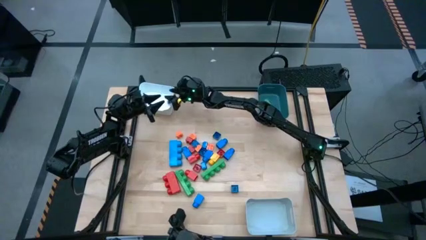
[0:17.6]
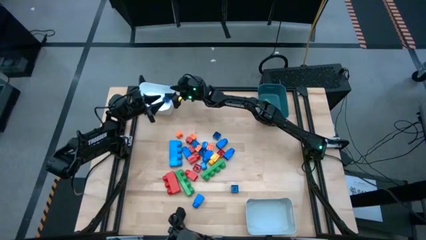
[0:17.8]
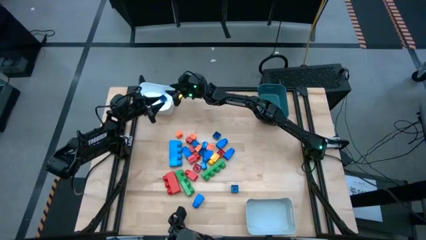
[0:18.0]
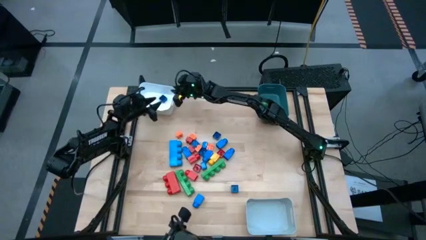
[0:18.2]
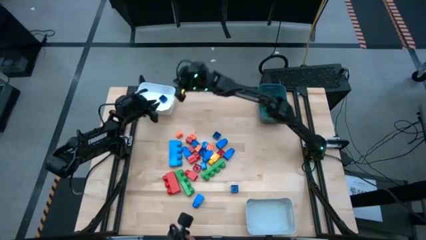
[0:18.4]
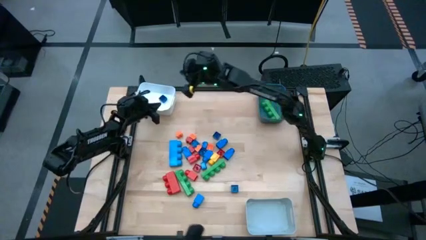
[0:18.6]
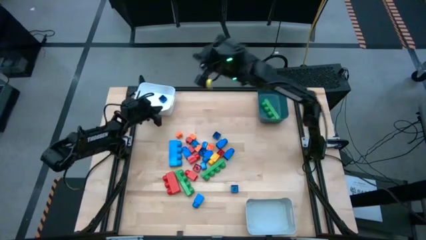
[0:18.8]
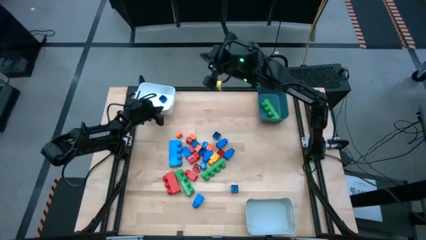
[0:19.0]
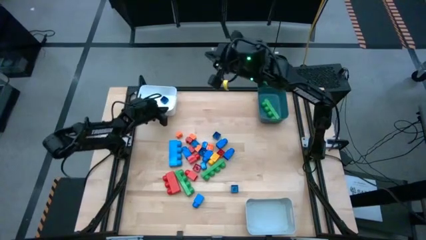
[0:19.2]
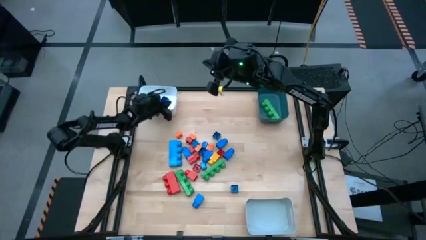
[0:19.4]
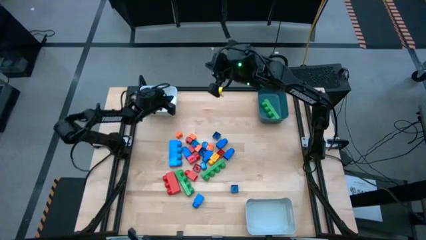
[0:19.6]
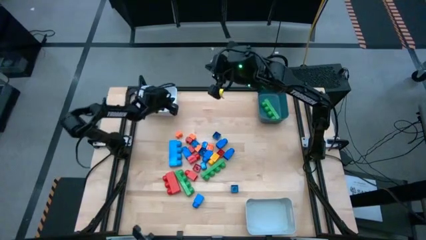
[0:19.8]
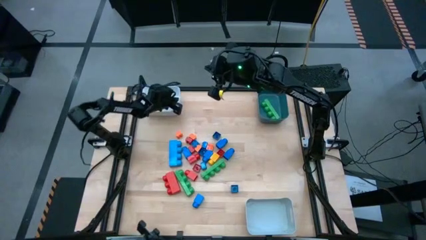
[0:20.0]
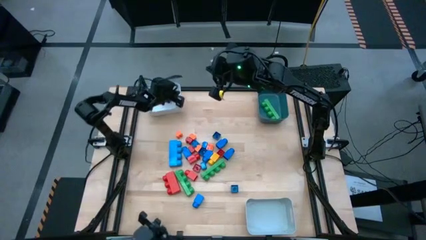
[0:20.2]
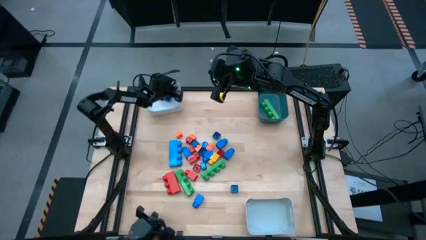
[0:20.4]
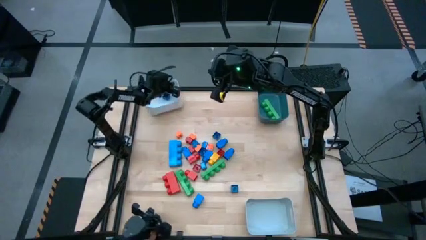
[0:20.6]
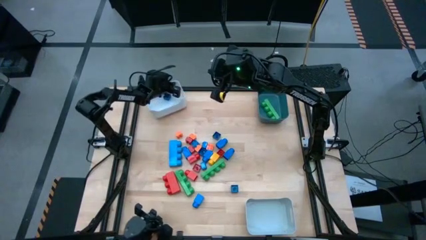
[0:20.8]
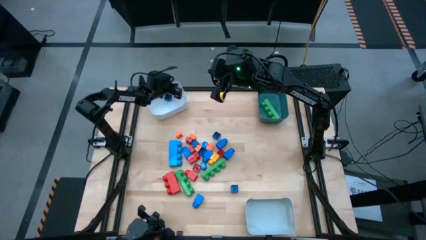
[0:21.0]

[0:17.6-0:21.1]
Task: Sort blocks by size
Adjust the white bin

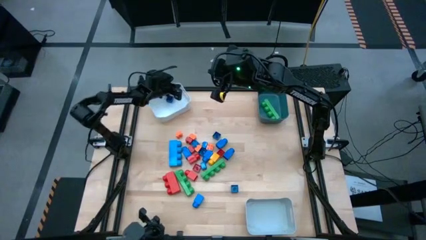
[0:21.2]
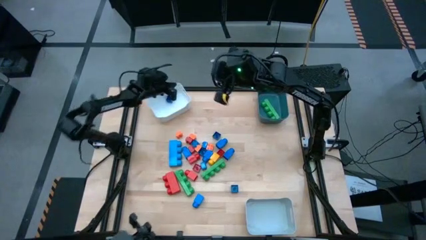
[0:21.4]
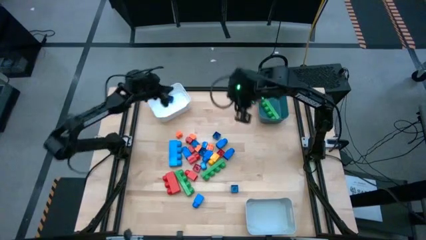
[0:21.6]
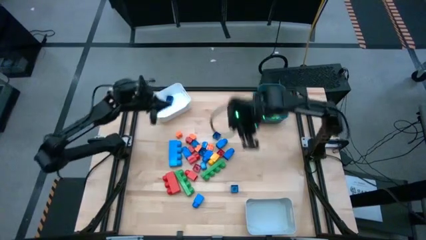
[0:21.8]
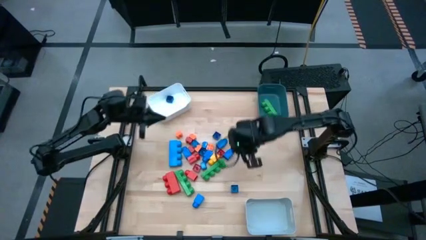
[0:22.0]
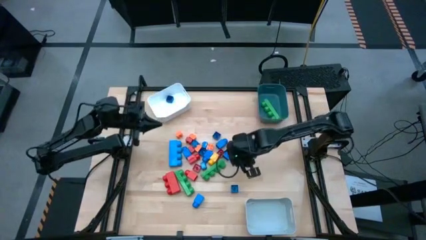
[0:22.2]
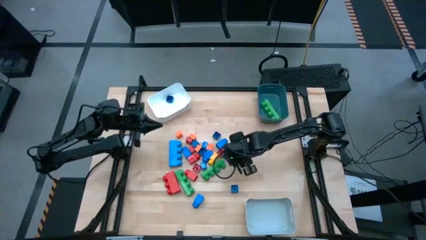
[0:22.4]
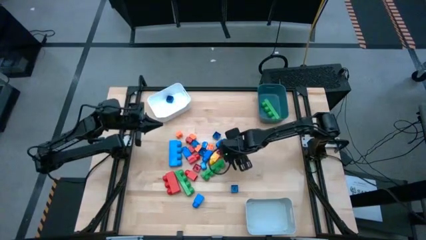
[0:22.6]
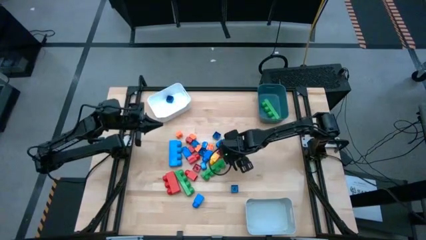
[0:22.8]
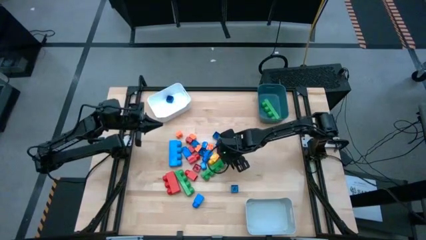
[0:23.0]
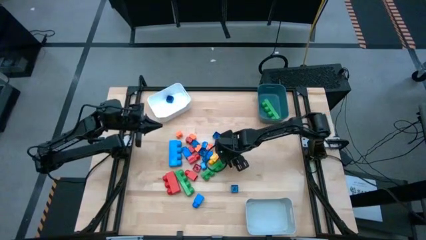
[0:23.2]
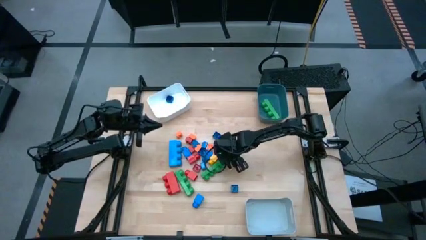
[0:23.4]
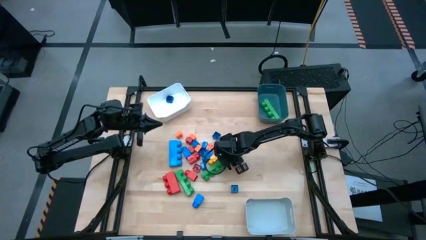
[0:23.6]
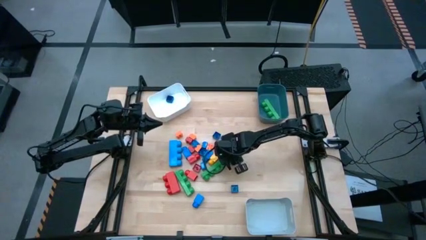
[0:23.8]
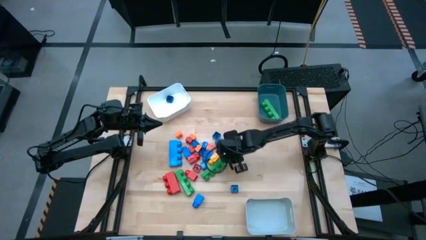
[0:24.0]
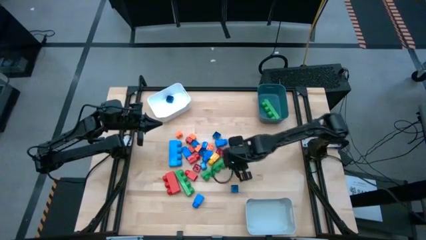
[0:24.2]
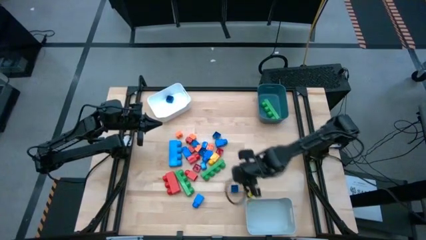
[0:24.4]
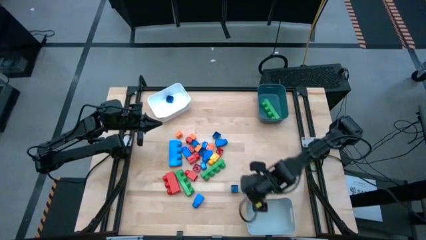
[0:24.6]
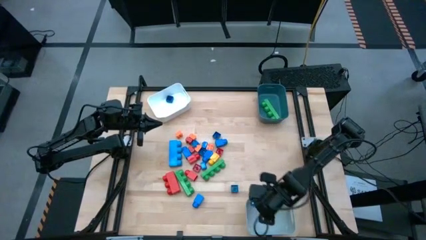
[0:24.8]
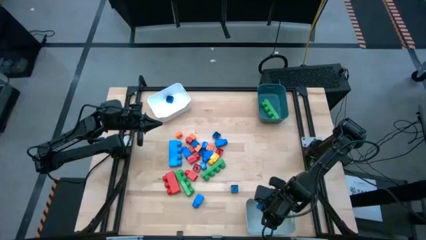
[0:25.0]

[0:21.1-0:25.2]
Put the 1 stud blue game piece into the gray bin

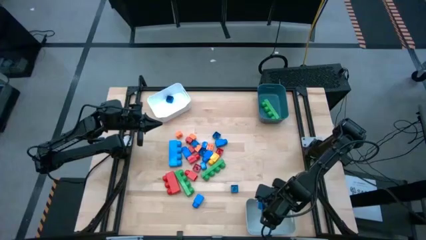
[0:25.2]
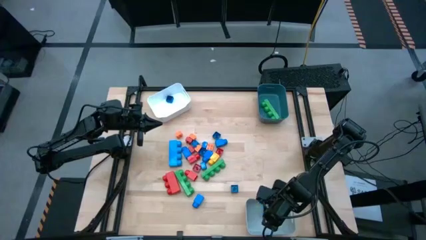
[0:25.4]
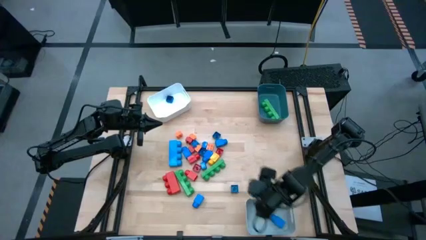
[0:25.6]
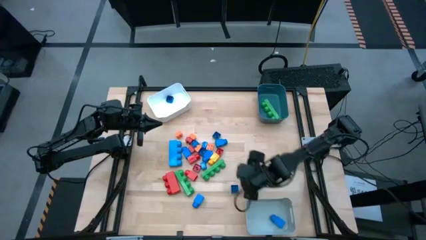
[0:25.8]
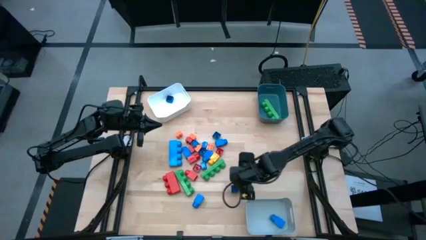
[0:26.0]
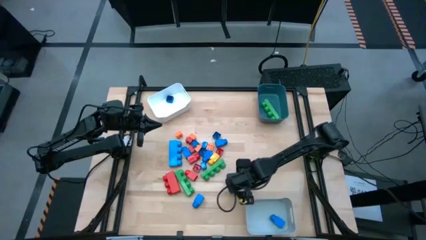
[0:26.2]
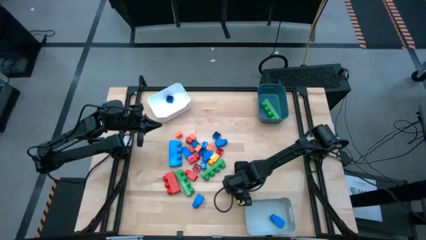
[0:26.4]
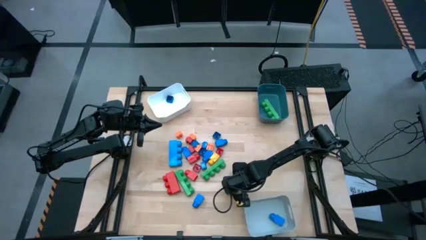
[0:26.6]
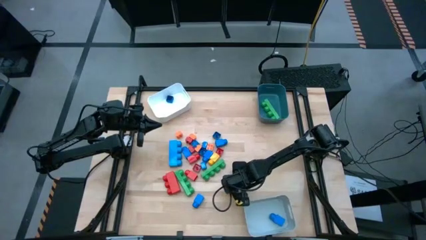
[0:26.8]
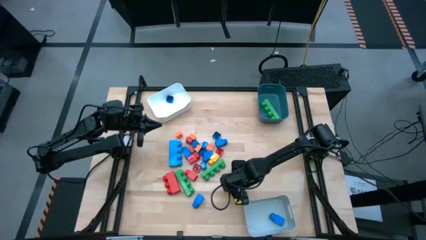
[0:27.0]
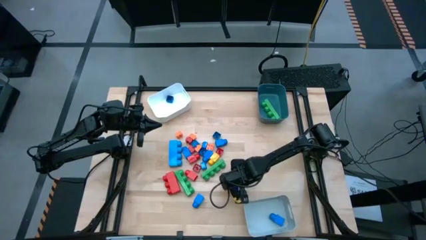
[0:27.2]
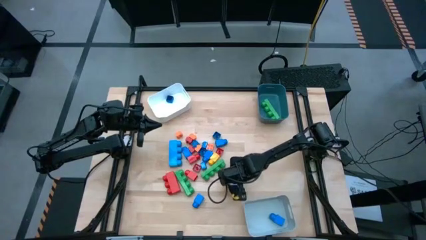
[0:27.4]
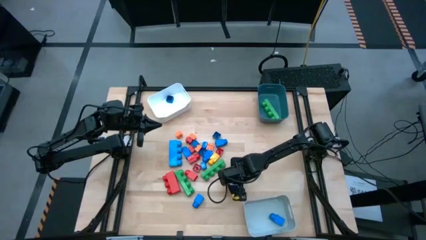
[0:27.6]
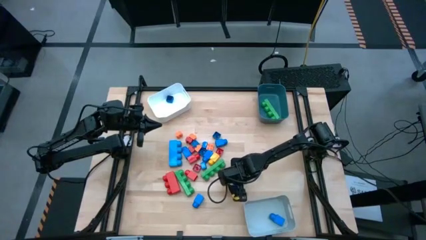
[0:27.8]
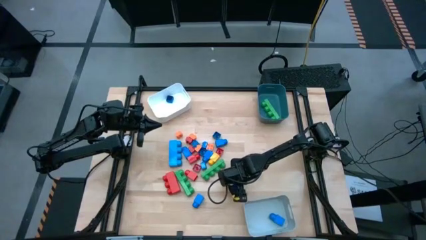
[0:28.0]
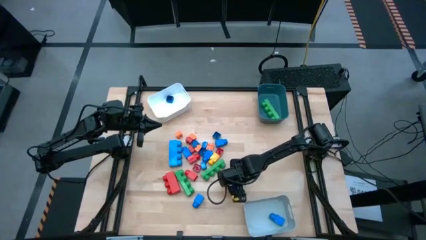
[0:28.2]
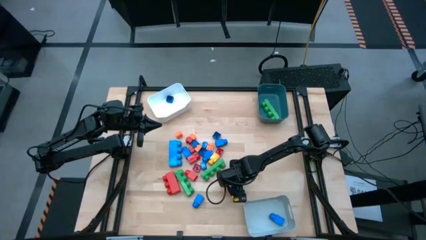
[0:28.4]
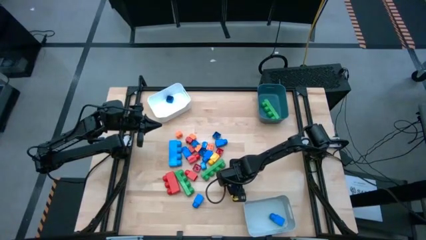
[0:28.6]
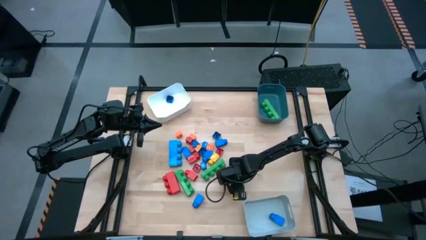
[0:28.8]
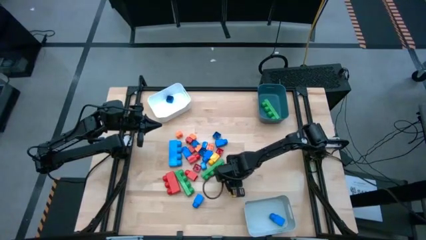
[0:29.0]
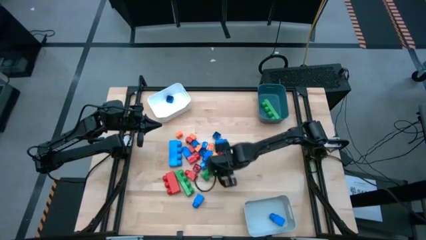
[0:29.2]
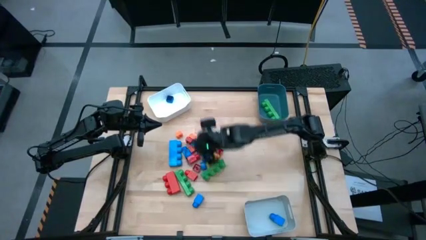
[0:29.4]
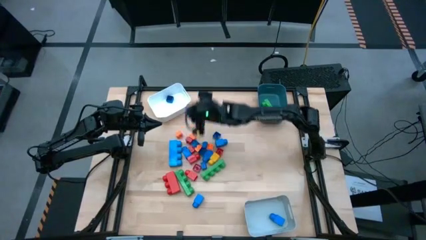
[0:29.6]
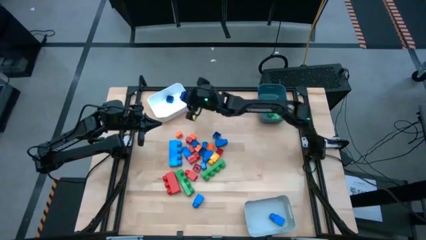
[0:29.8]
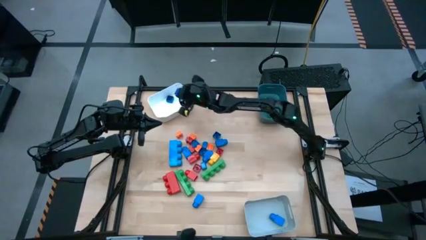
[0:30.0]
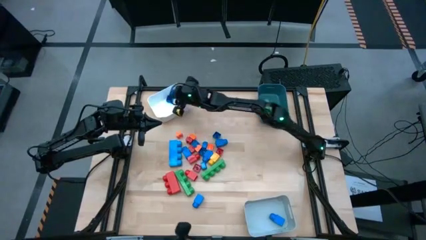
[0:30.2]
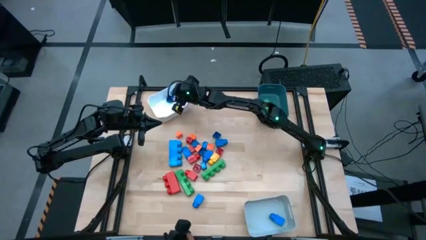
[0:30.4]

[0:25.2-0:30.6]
Put the small 4 stud blue game piece into the white bin

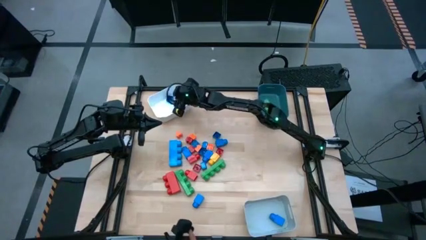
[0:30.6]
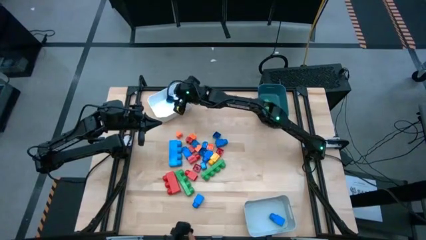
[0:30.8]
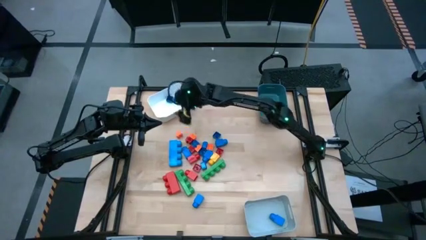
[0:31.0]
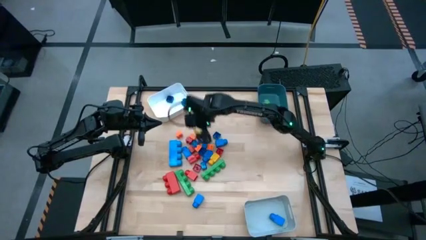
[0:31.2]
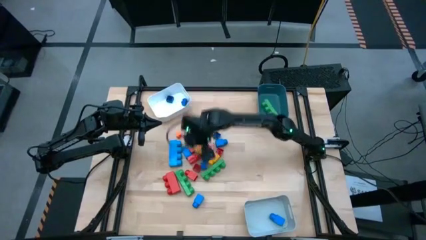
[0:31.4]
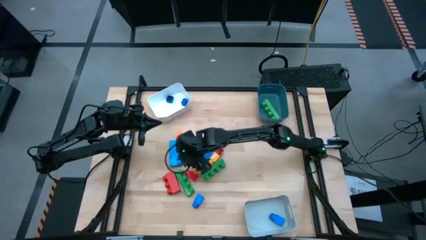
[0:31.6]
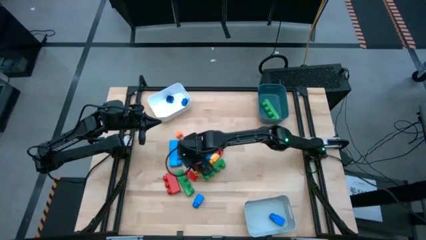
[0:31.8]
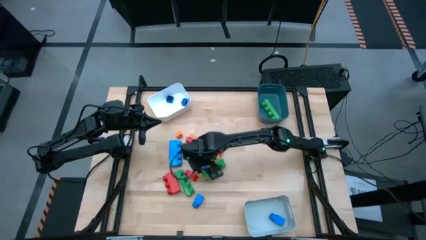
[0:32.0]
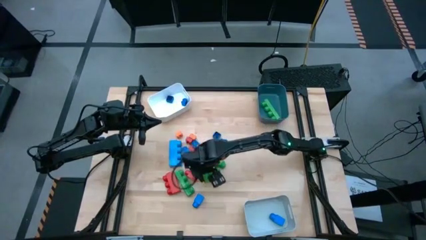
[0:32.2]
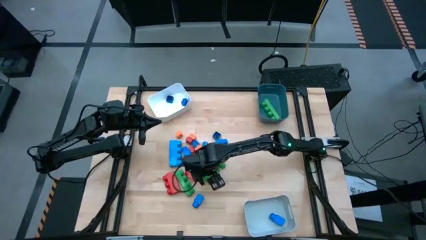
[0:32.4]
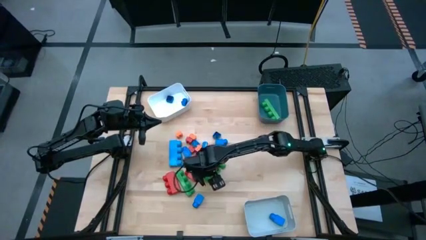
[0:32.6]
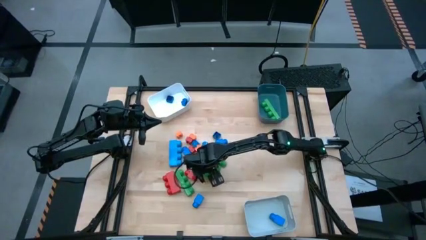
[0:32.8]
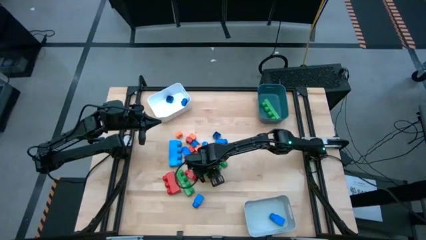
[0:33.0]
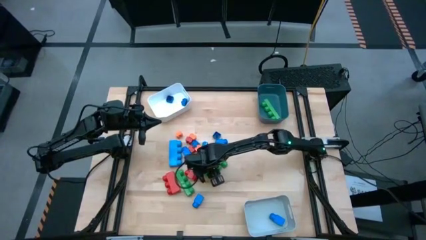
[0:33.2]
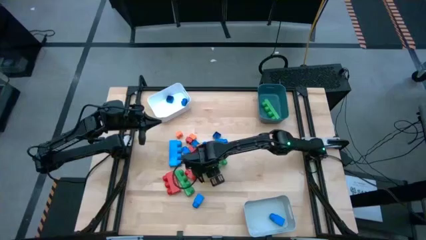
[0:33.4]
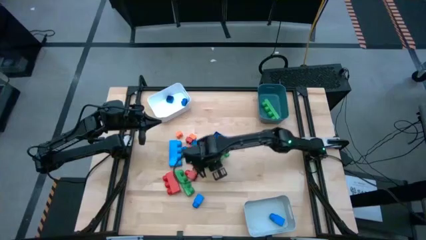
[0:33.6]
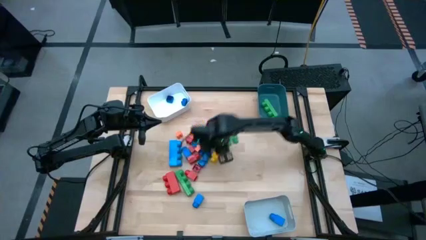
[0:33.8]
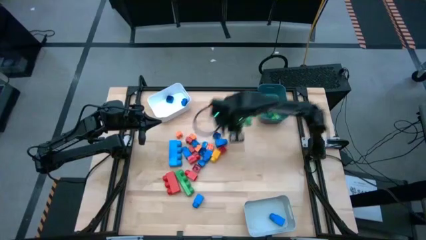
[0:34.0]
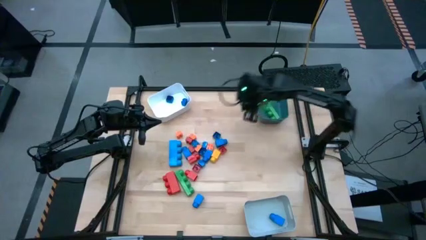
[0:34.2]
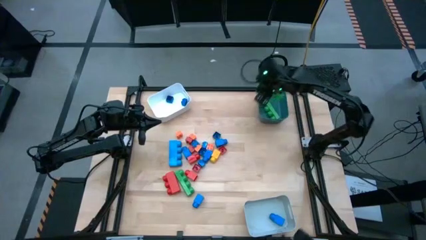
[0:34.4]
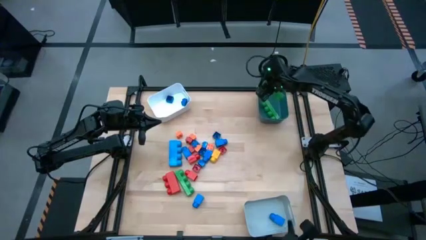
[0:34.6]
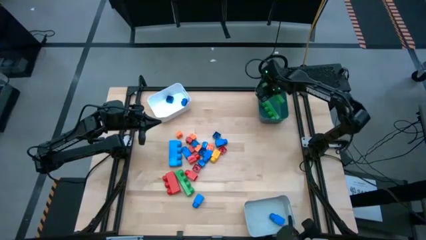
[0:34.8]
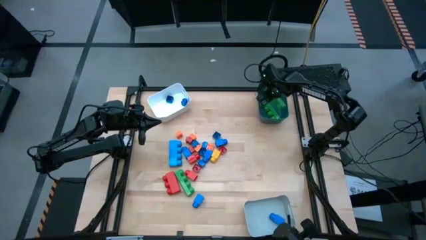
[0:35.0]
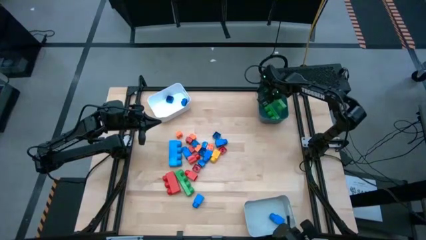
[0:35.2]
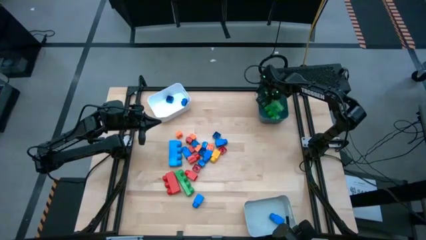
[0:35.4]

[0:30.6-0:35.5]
Put the large 4 stud green game piece into the blue bin
